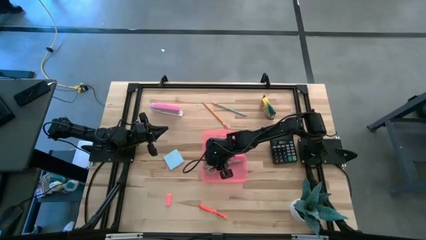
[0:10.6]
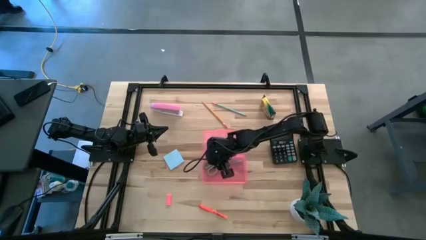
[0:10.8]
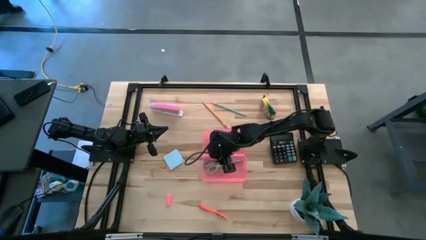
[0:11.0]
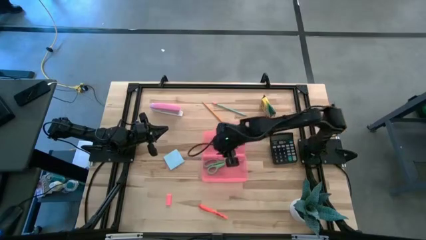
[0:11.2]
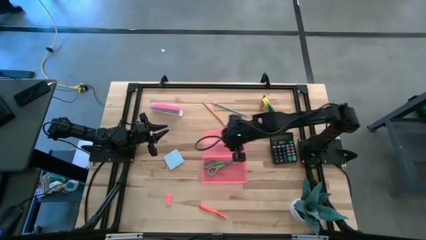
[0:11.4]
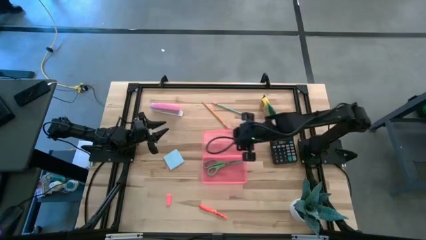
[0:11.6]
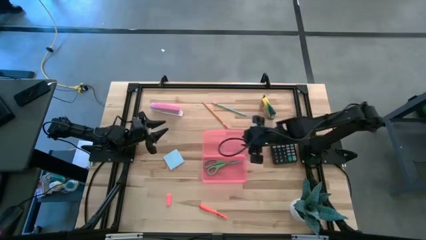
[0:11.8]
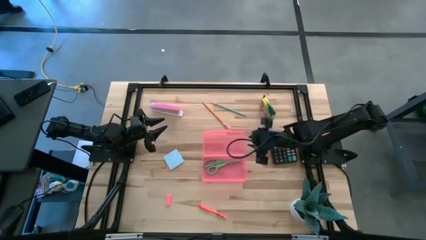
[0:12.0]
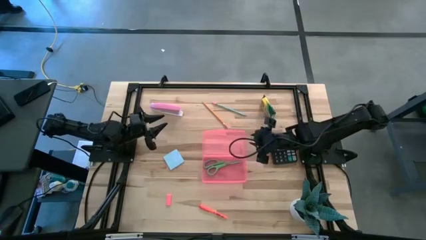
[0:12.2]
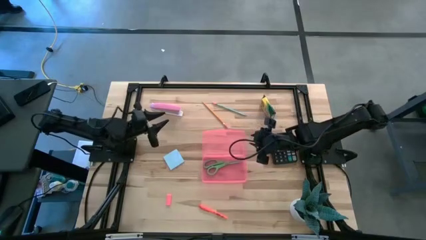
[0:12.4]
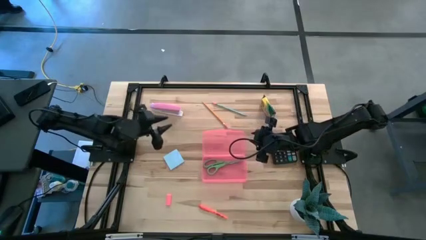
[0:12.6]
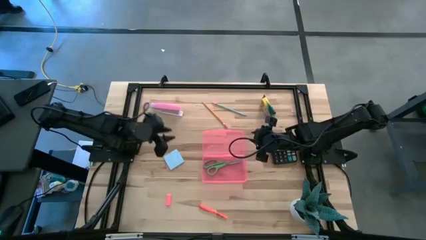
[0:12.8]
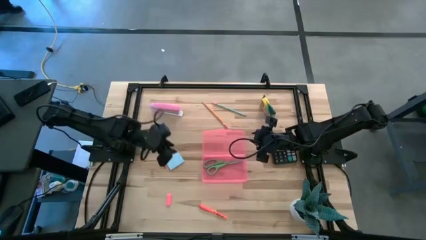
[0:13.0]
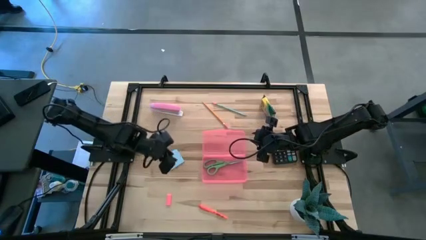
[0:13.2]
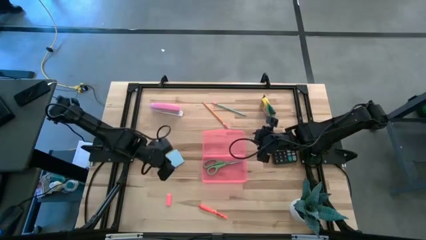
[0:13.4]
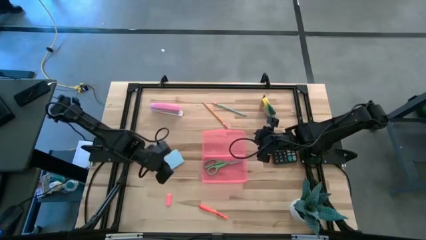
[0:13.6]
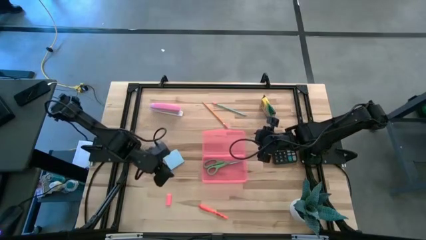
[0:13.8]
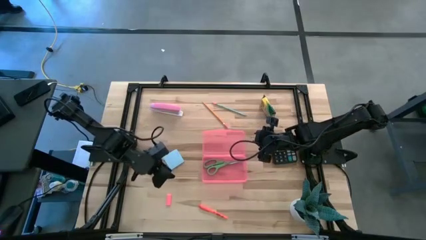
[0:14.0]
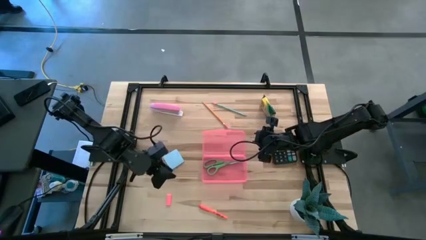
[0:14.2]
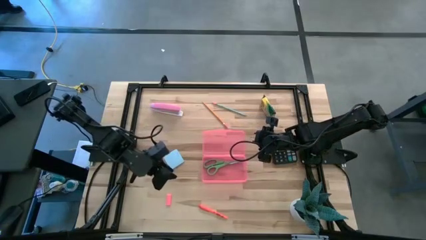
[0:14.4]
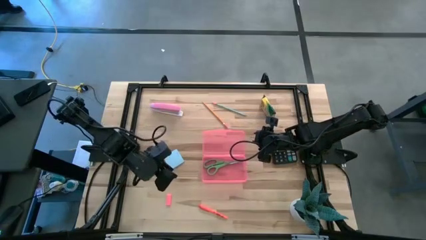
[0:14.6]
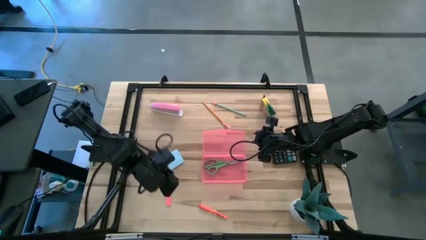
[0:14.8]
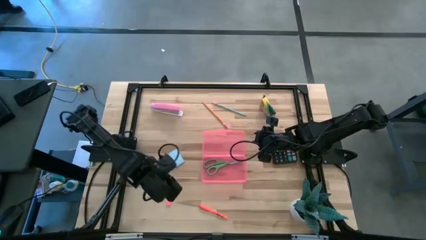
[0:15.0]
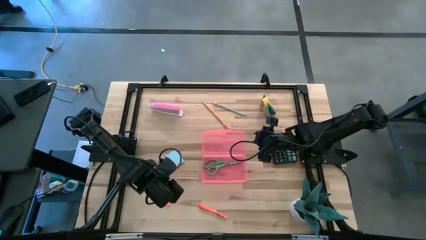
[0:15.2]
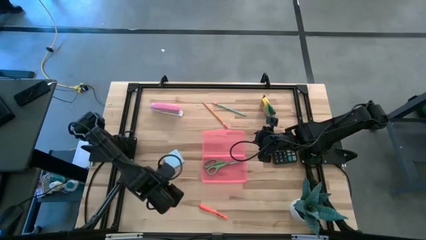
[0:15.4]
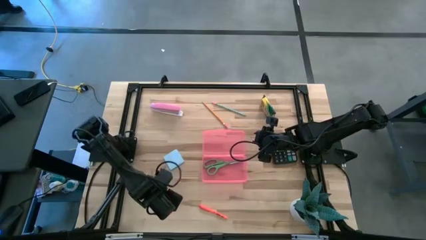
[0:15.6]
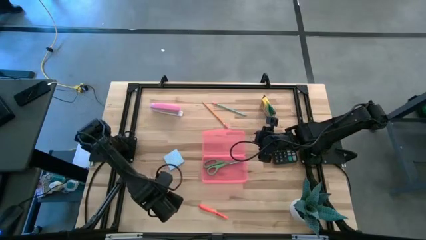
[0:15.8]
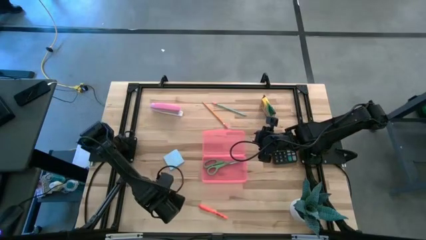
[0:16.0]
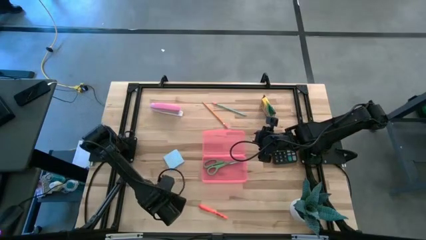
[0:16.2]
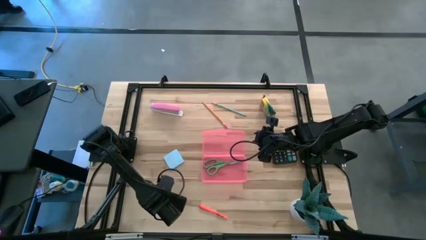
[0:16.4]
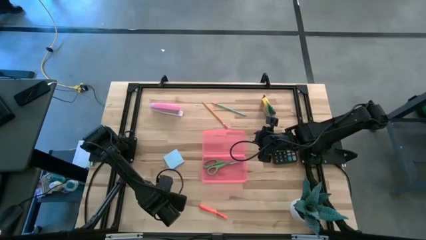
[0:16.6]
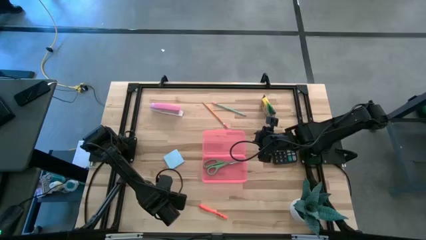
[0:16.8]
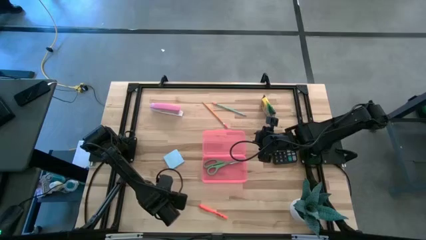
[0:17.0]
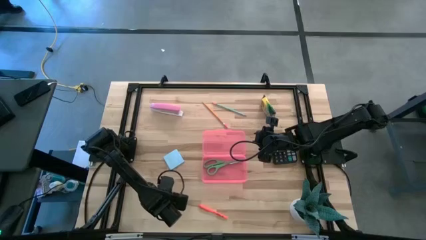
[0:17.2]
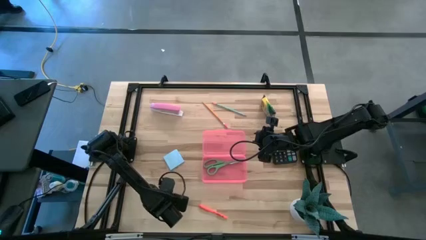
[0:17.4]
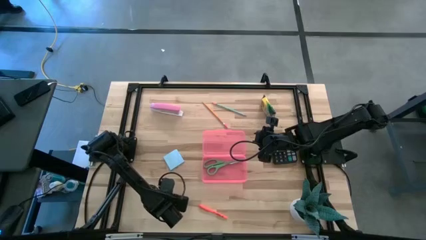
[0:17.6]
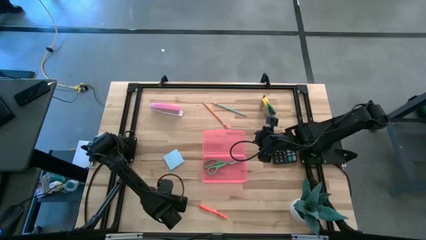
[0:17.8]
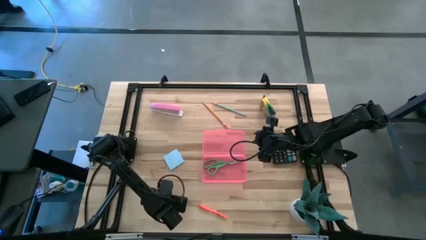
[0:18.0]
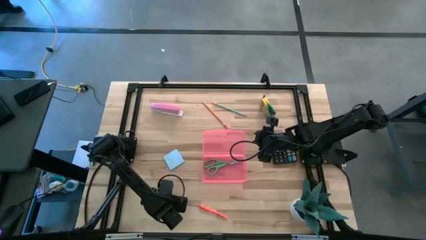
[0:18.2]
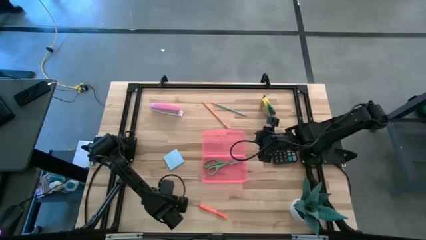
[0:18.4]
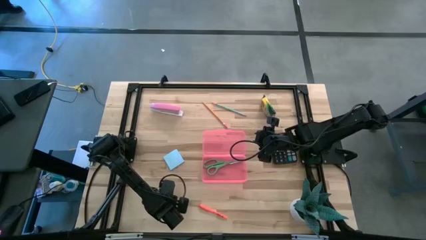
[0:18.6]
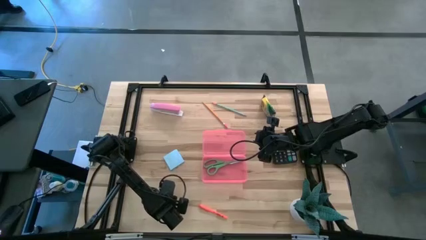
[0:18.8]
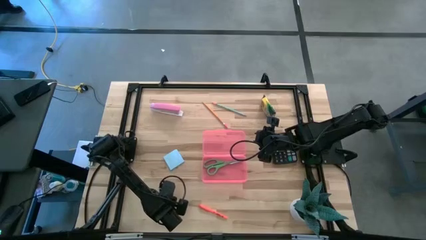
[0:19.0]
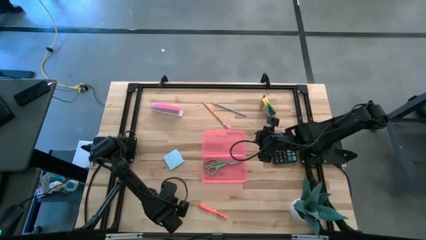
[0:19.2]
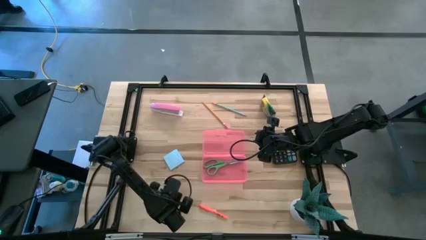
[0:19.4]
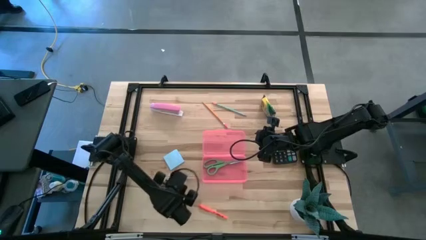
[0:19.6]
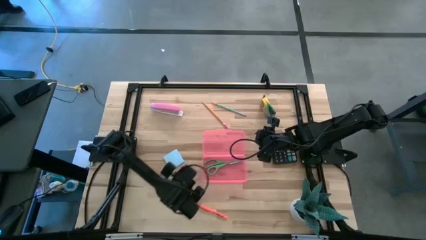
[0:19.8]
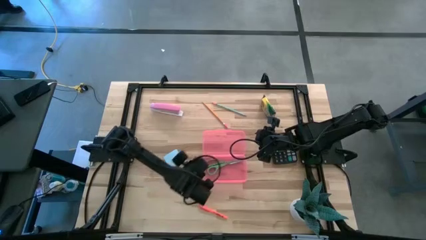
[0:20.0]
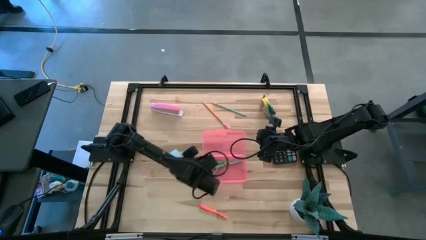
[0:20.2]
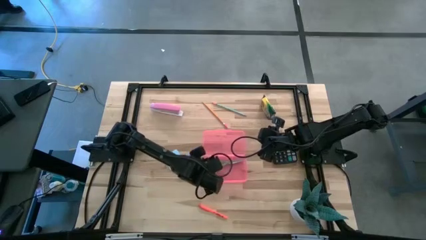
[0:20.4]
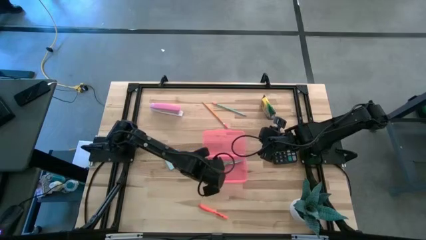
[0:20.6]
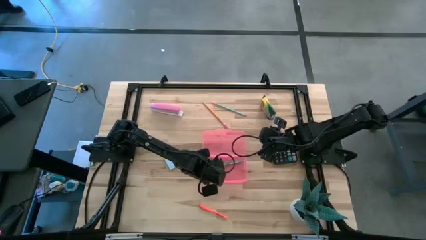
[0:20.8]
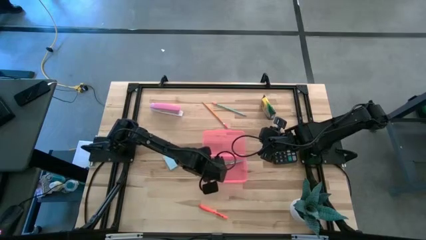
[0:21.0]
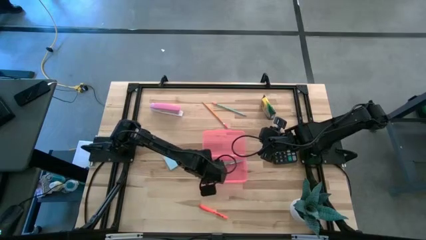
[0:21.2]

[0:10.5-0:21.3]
Task: Pack school essentials
Put the eraser into the supply box

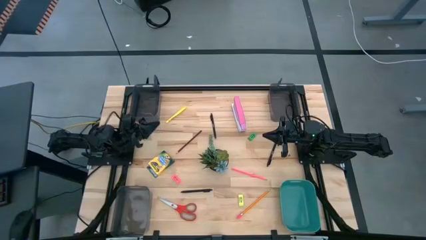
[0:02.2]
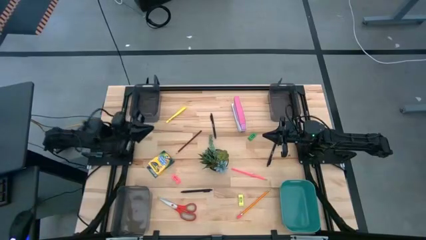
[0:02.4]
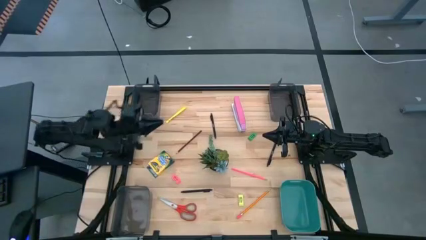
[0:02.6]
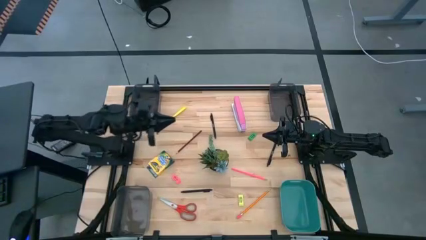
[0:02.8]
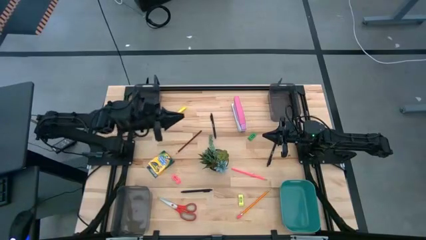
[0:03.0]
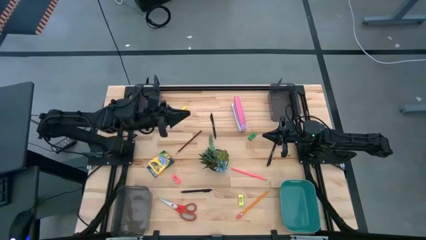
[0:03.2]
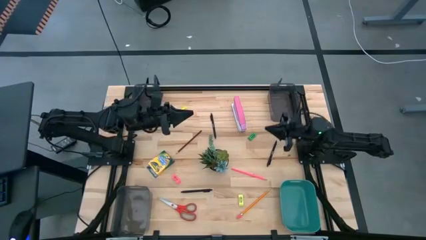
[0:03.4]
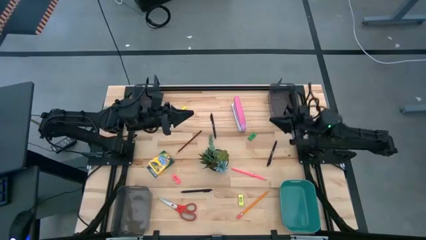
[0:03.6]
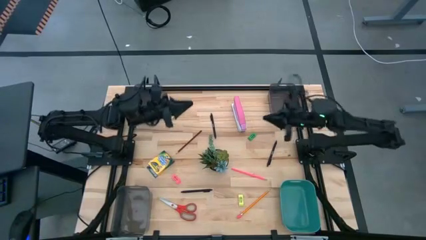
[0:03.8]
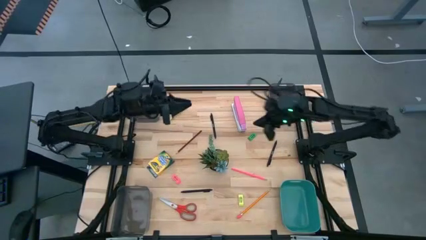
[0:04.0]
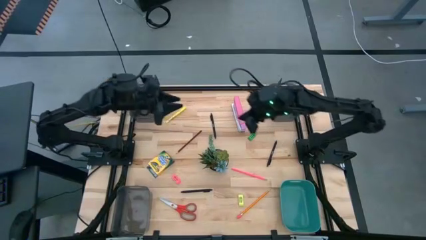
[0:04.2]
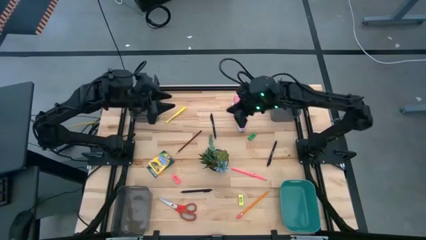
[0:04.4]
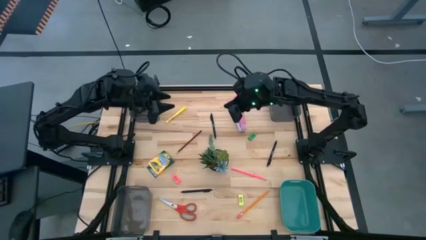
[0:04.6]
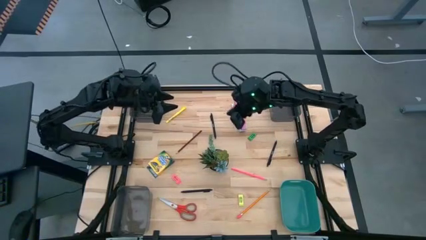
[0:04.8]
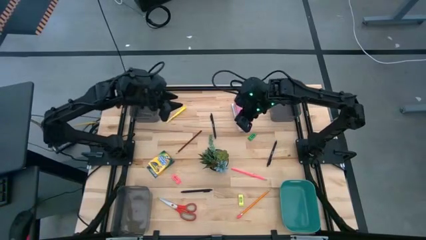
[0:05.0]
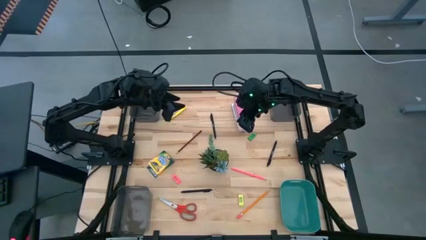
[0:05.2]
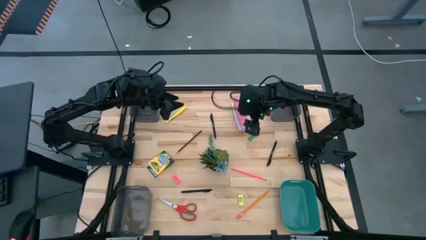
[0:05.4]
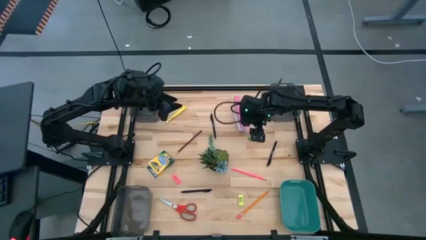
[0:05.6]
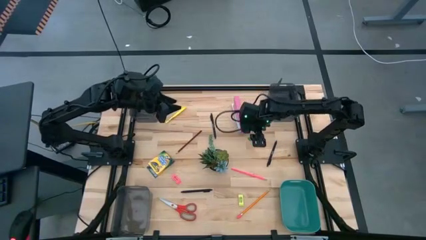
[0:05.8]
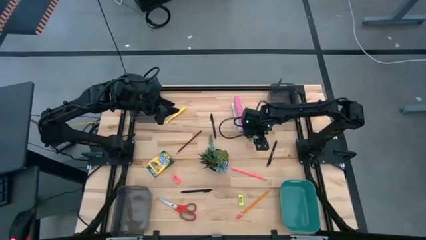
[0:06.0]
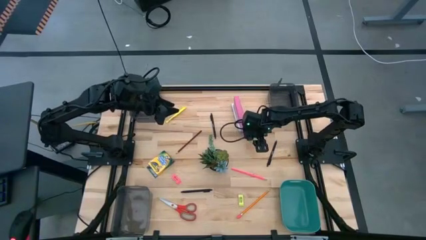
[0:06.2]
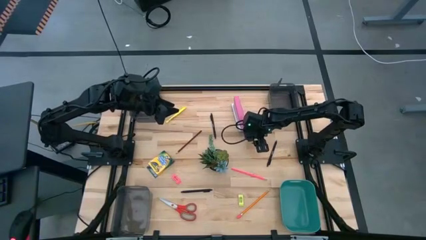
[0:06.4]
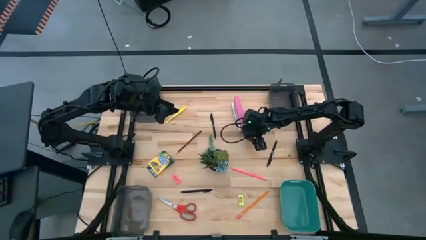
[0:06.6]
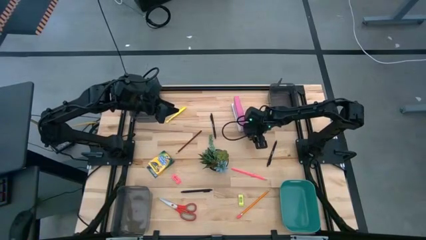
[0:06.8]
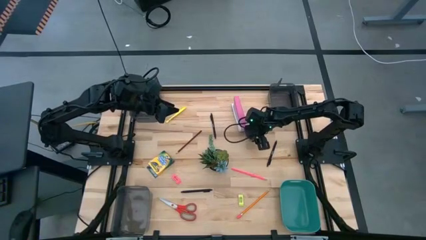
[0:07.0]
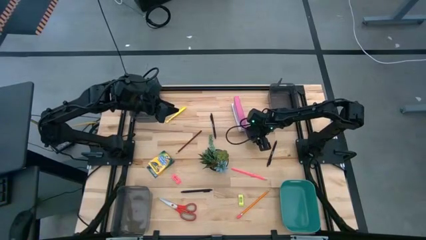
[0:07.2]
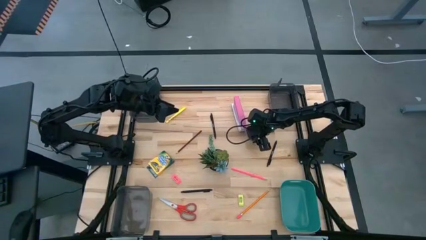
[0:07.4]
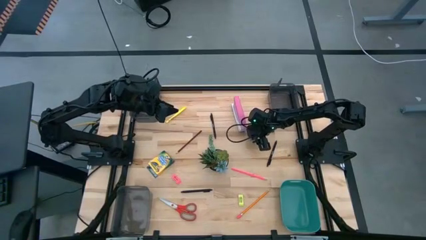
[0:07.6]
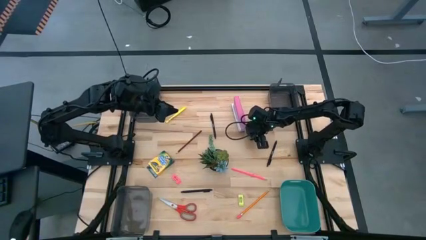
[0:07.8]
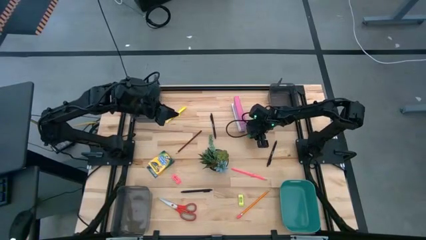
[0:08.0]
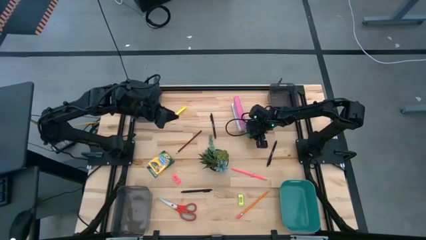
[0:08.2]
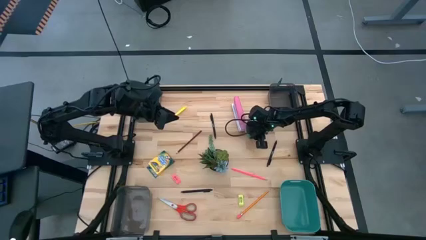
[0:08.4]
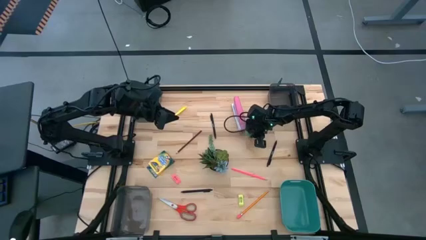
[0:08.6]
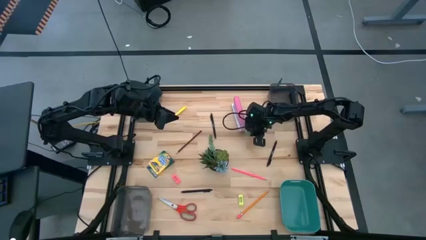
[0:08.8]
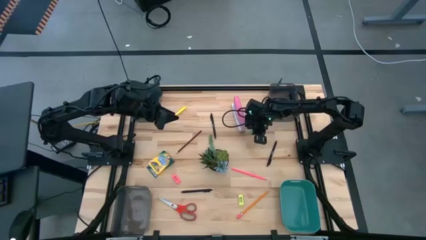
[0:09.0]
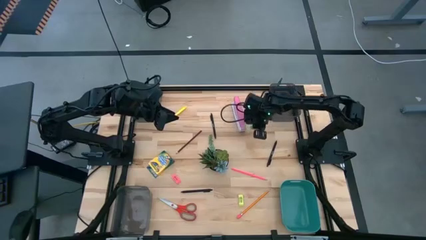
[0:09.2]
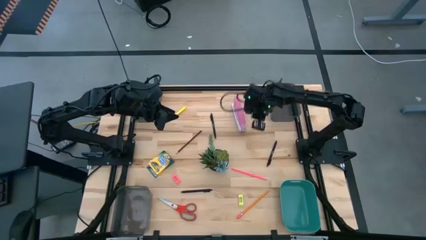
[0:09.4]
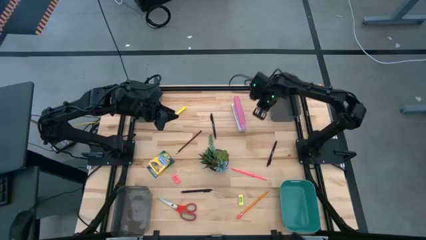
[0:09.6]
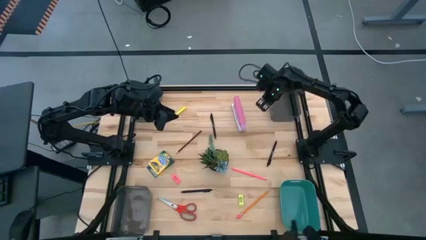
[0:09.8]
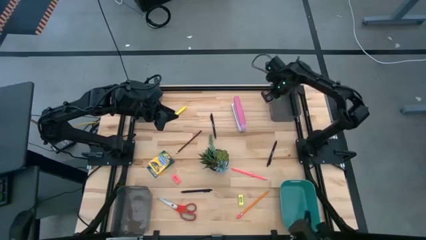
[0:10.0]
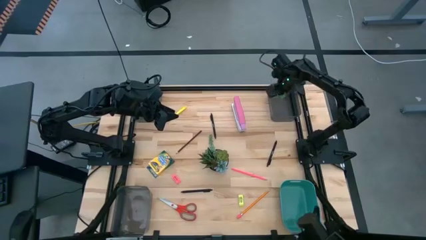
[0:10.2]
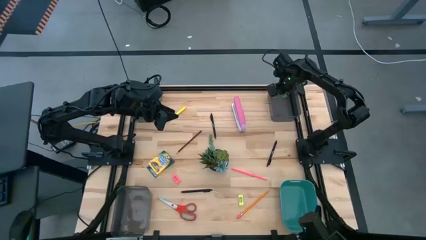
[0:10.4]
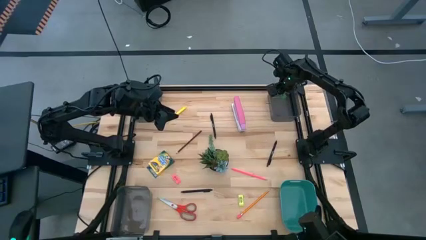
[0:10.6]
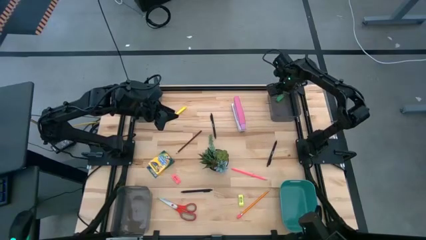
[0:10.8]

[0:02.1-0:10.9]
Task: Sort crayons/erasers/pens/pencils in bins
Put the green eraser into the top right black bin
